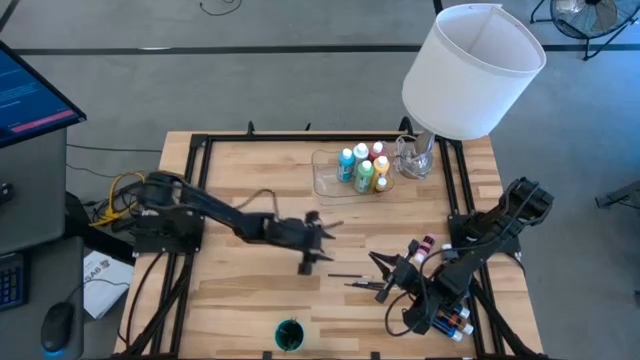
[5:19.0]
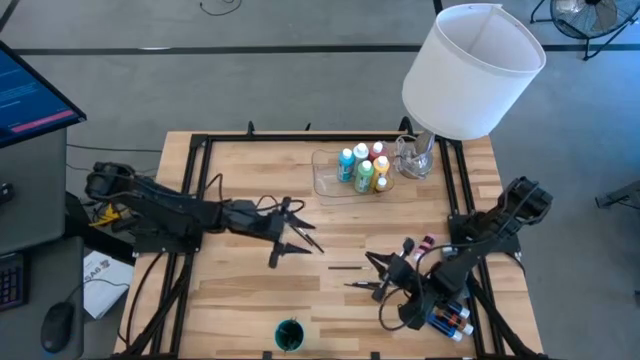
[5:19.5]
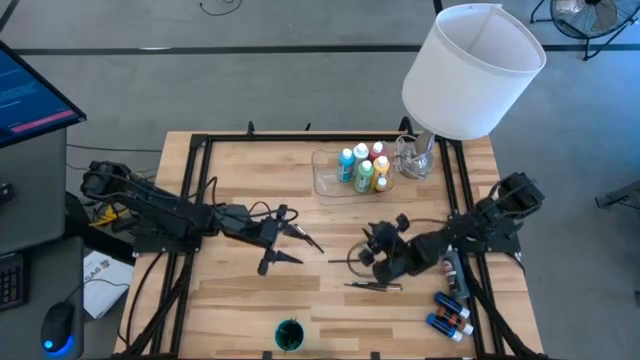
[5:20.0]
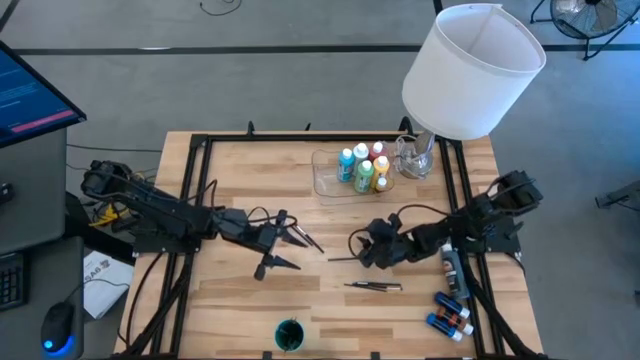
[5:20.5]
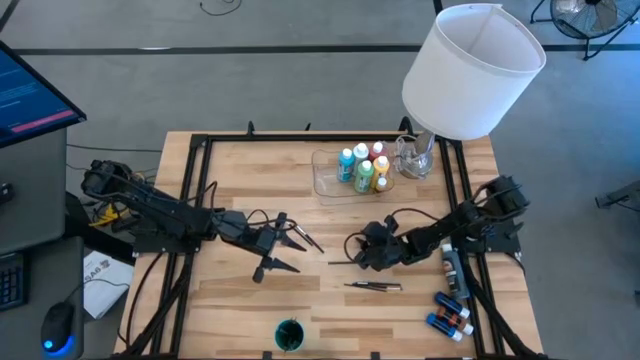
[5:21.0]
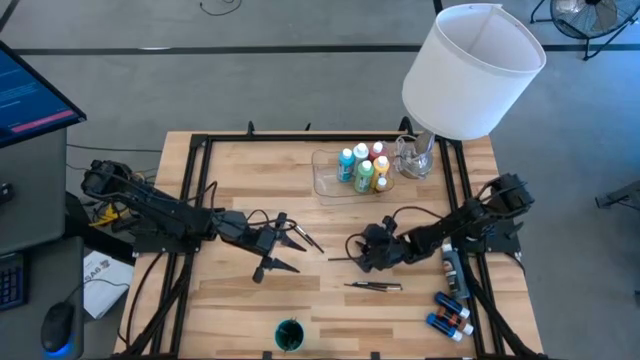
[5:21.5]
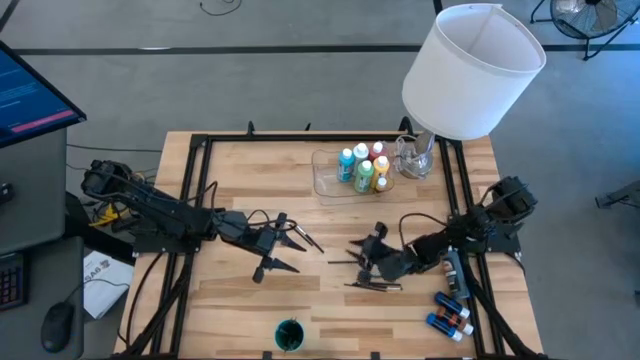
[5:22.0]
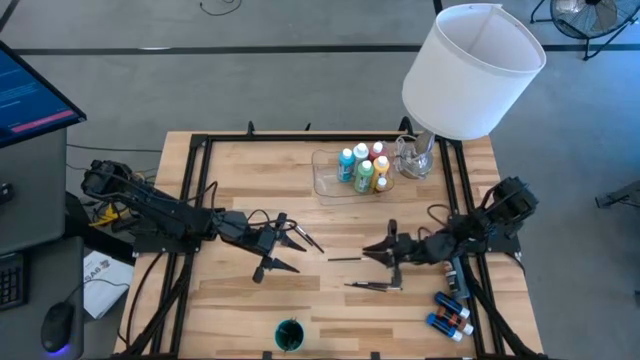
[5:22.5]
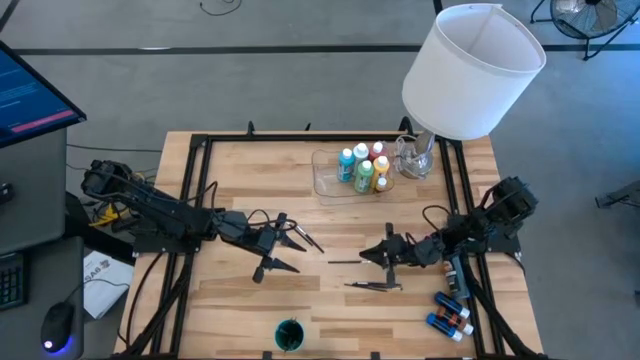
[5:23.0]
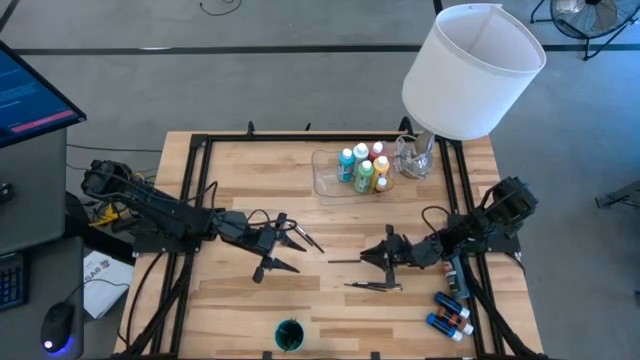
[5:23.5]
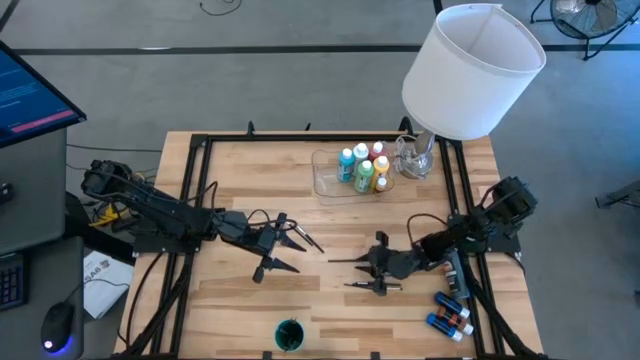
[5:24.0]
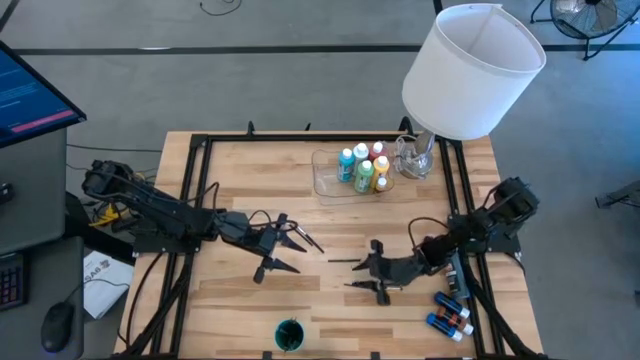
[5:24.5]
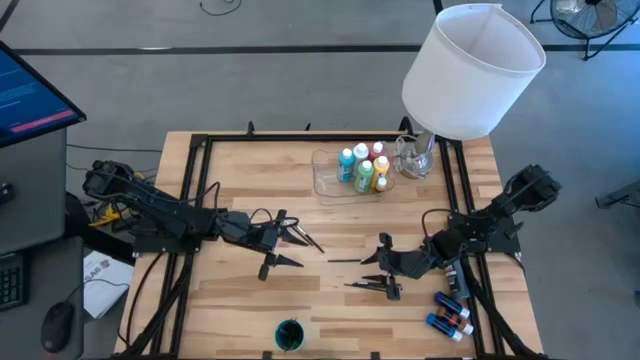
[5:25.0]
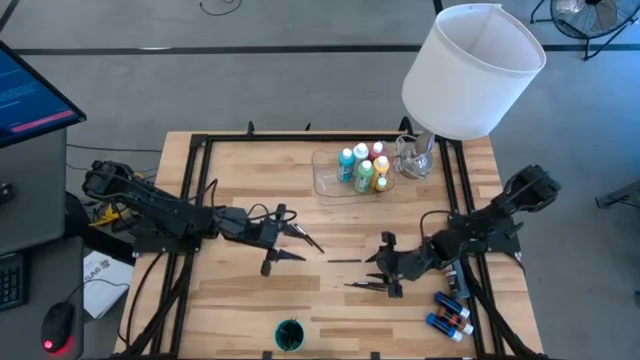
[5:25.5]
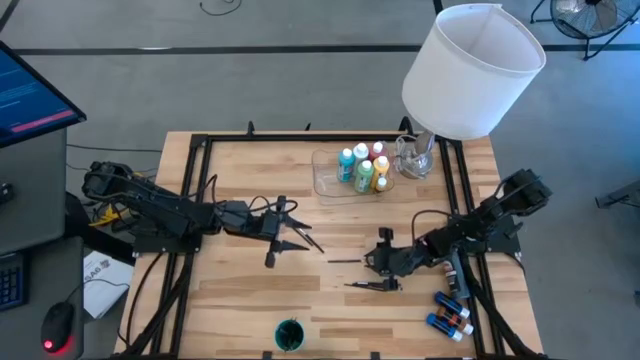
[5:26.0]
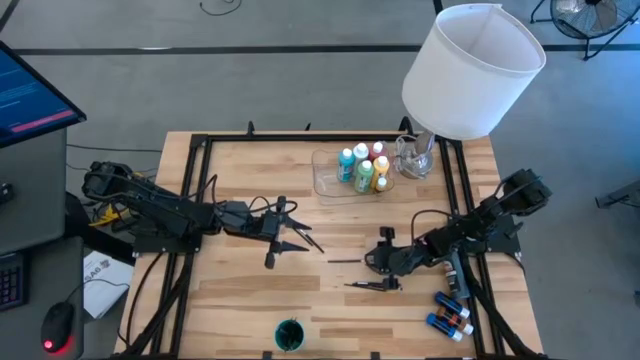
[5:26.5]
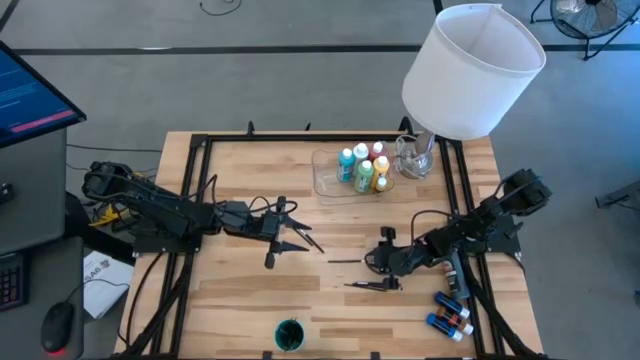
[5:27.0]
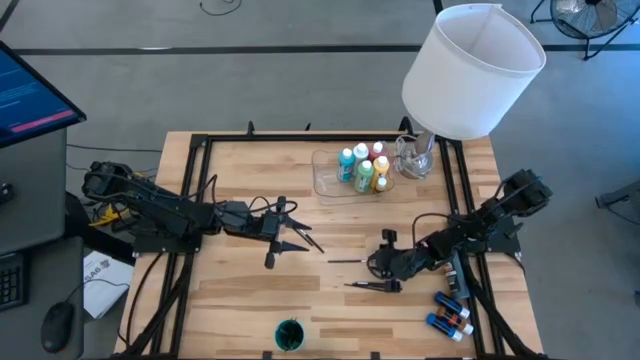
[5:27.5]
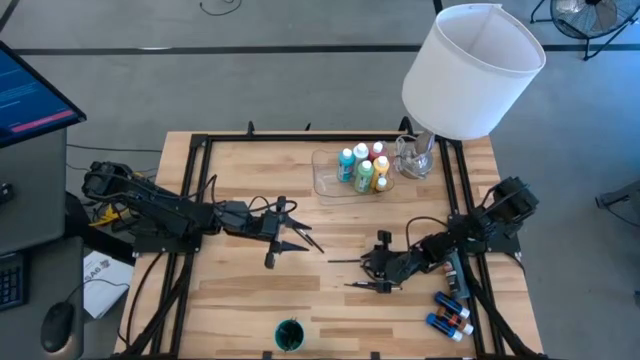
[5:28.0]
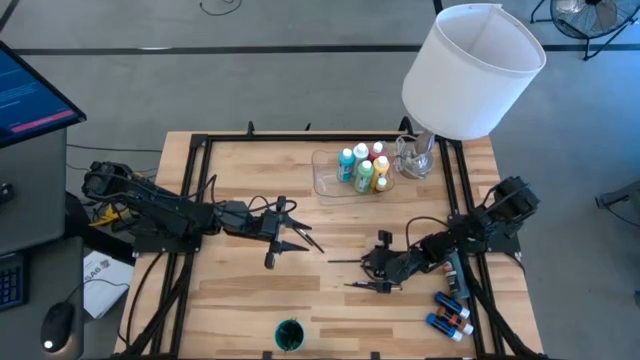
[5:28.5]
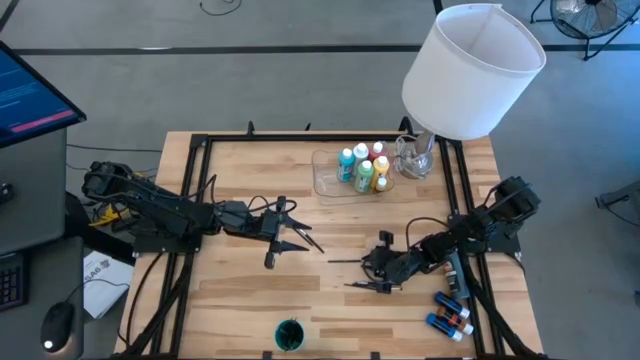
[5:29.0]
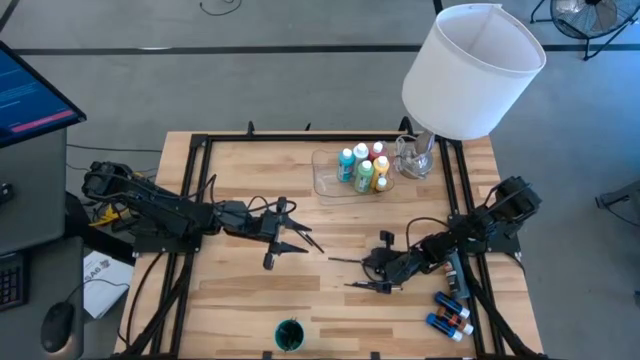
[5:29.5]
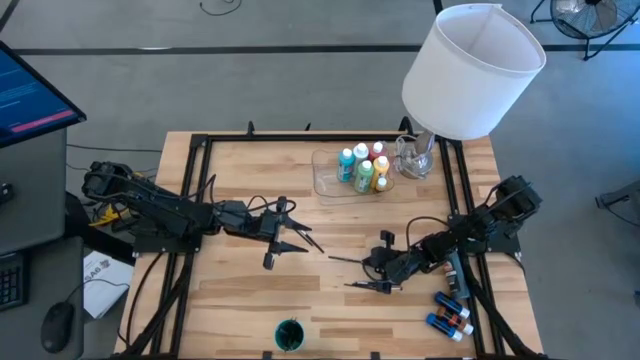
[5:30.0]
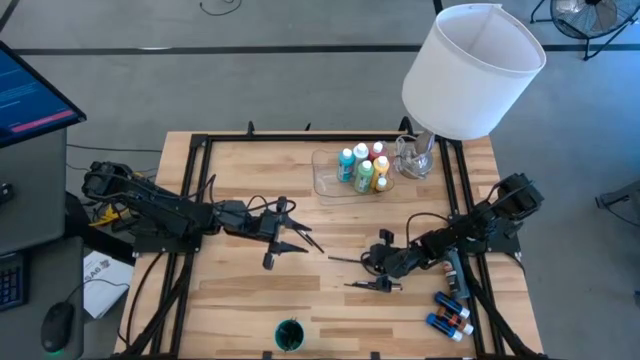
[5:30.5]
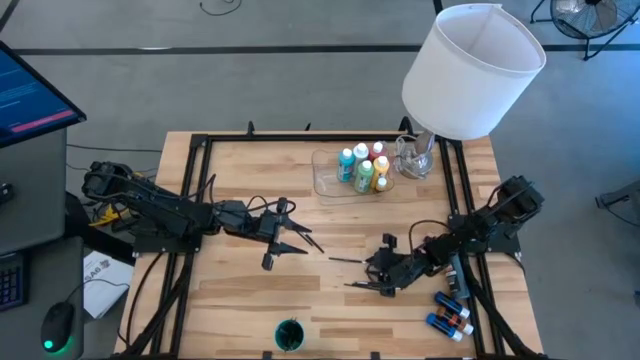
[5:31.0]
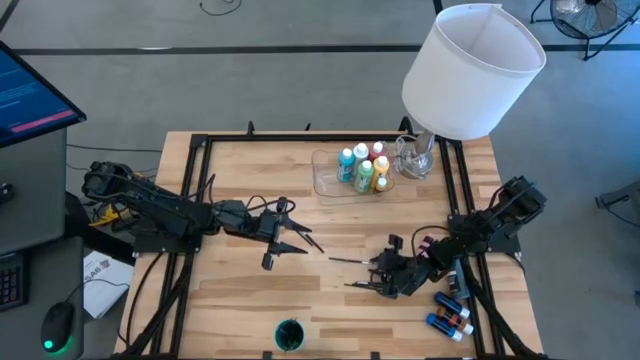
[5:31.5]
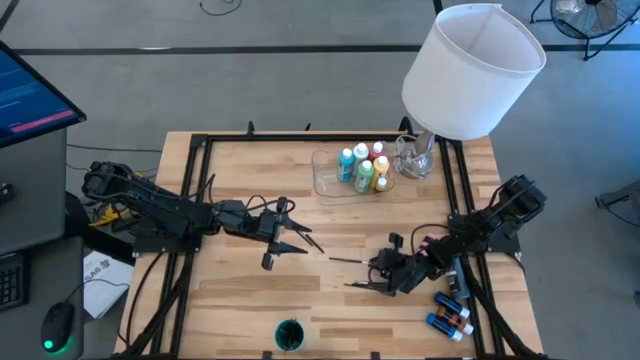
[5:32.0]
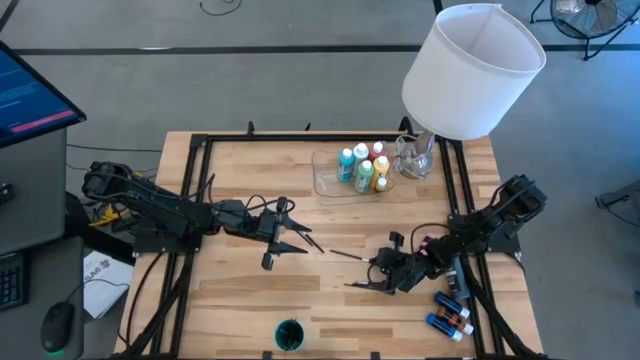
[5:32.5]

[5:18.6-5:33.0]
Task: Pick & Place Paint Supplies
Put the silver paintbrush into the green cup
